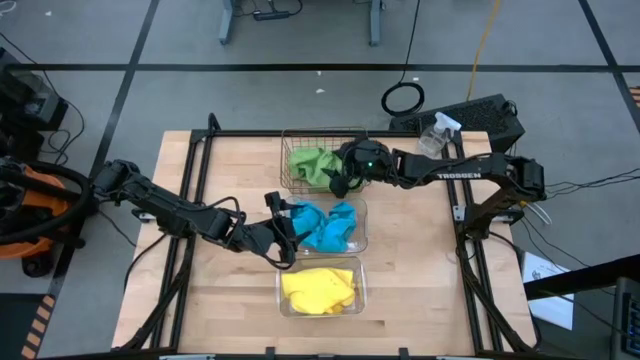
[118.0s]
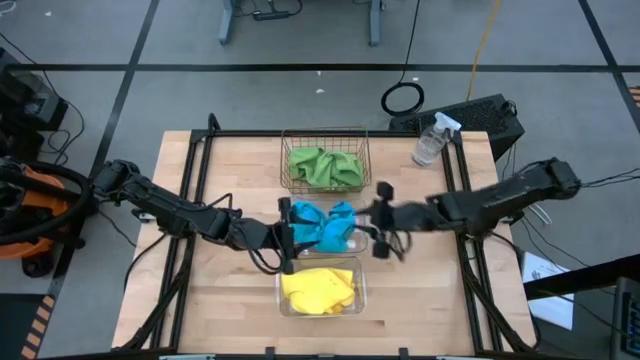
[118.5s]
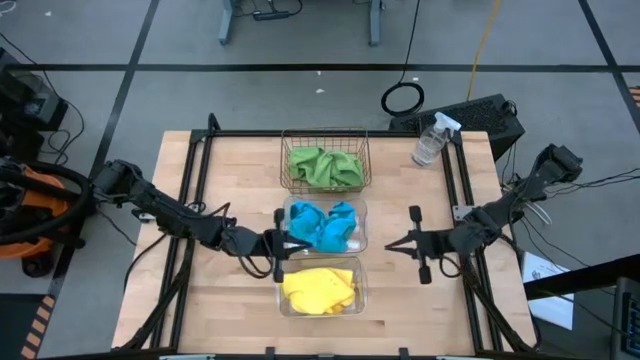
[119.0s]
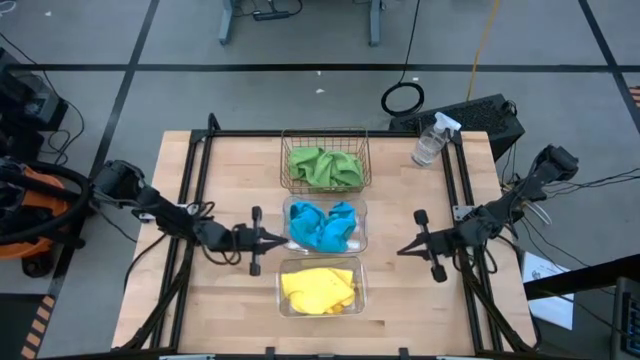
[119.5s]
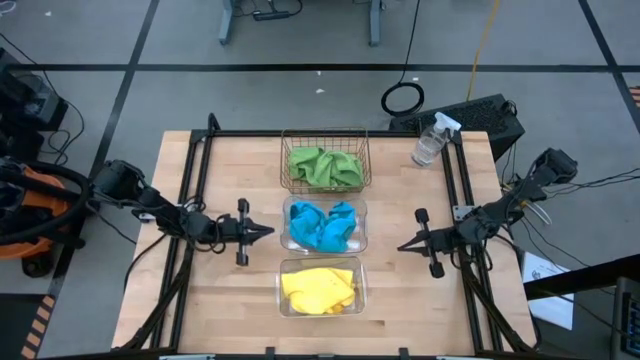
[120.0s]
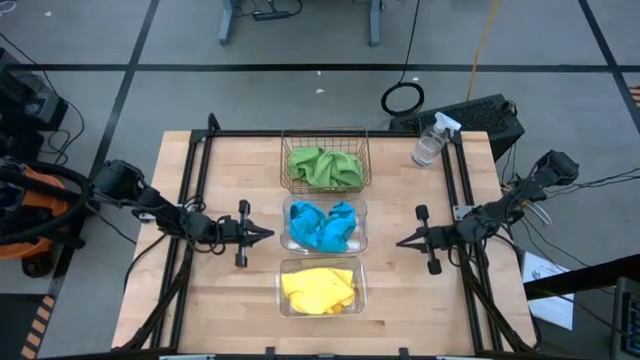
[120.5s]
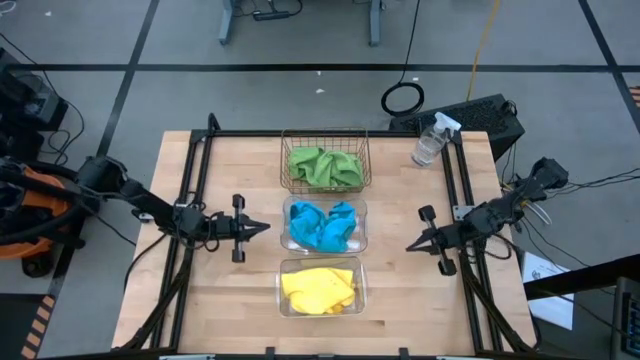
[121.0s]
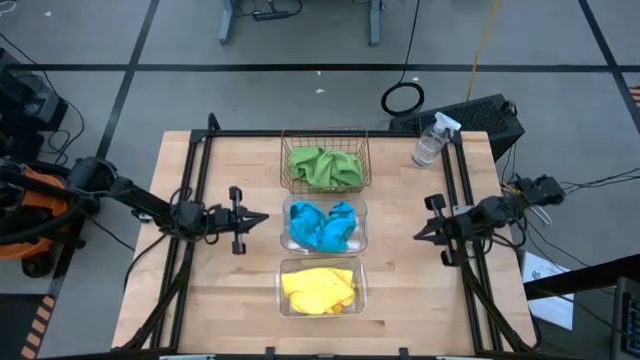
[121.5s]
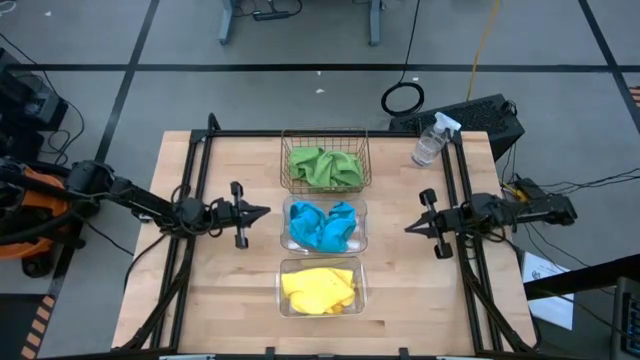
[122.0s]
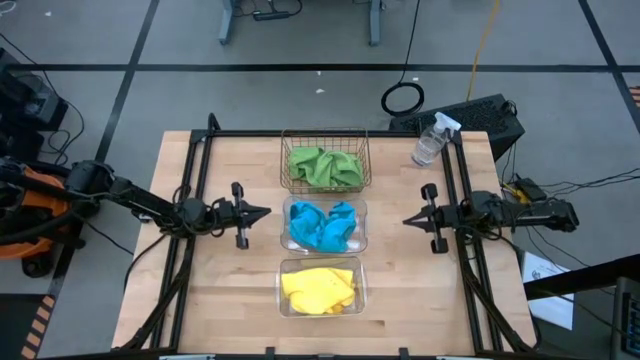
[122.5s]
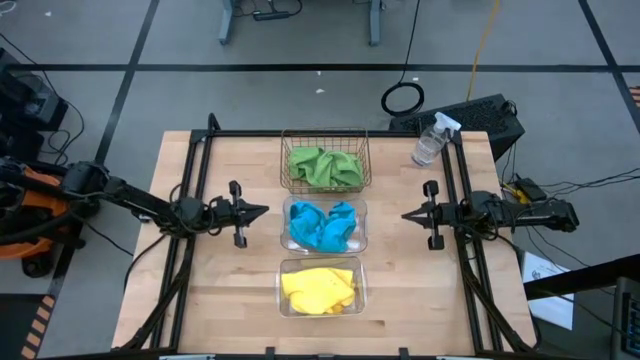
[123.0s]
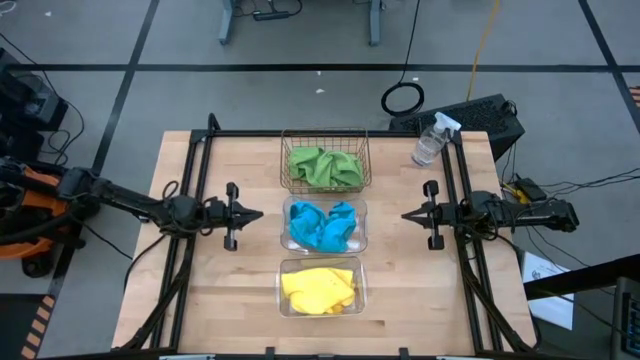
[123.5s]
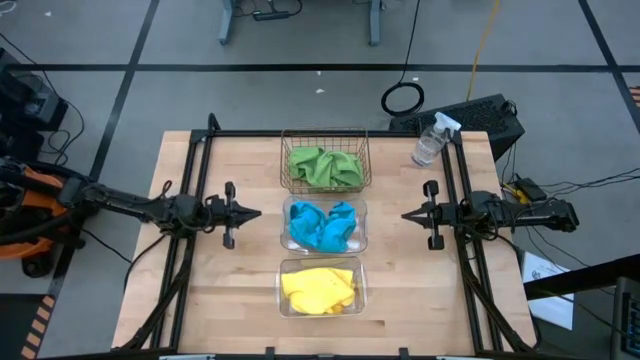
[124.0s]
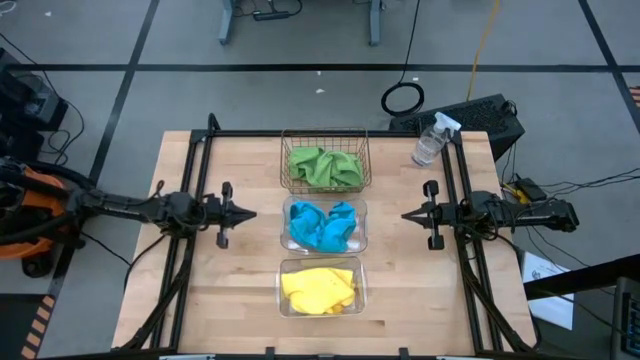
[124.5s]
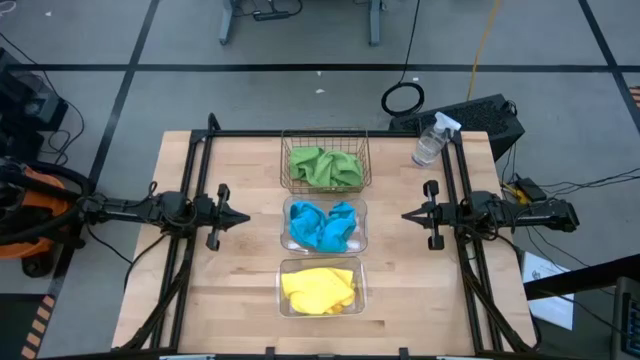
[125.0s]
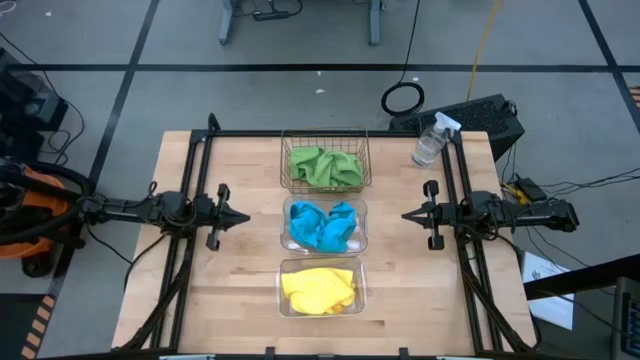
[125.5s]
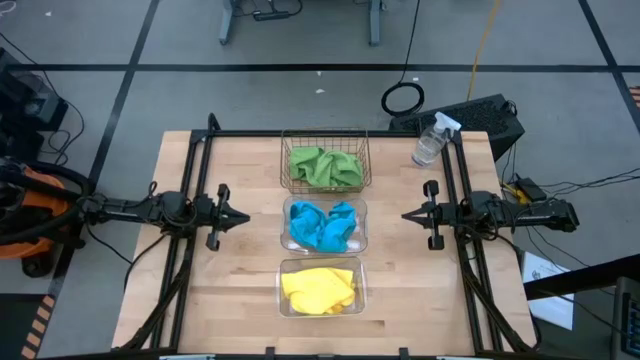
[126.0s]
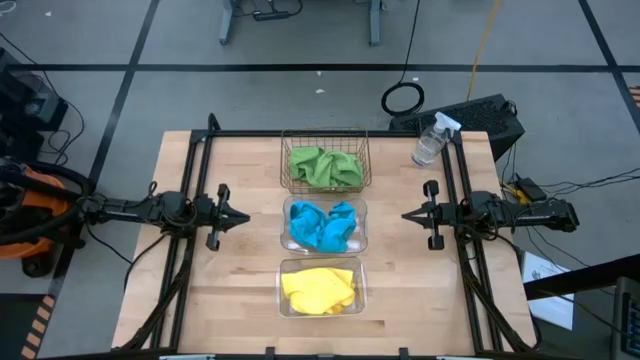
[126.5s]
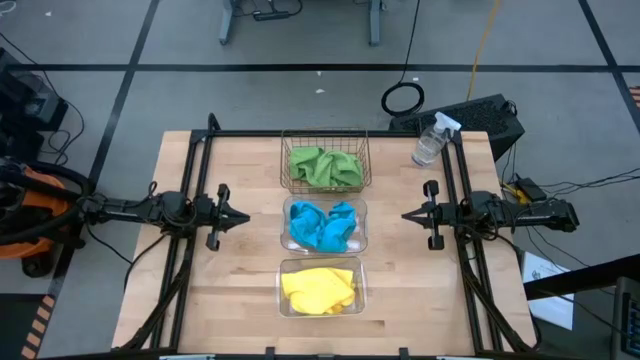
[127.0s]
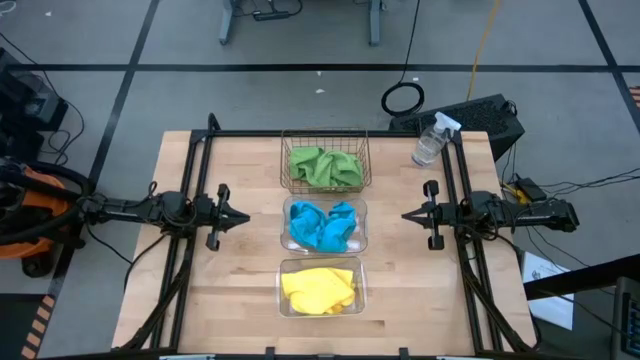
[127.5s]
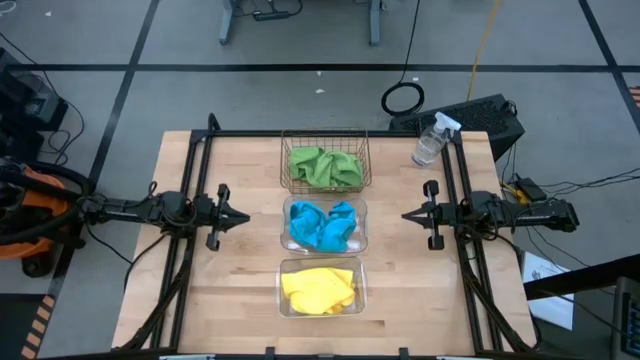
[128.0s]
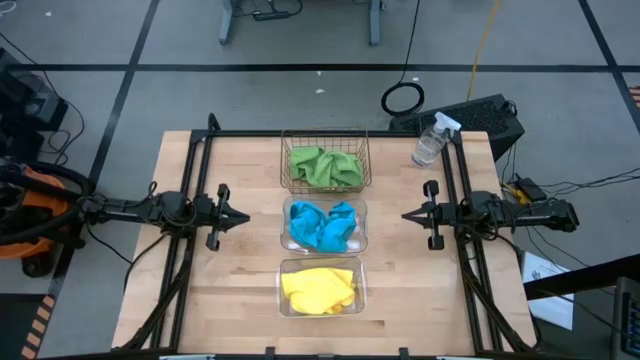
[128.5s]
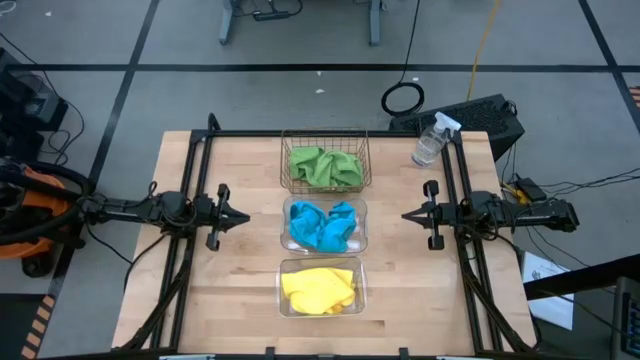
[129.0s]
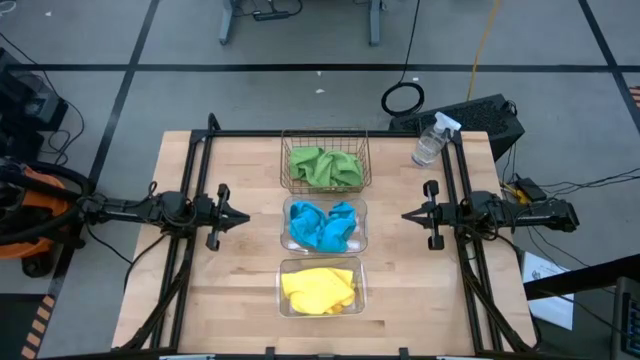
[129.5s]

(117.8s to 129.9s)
Task: Sort microfiber towel by color & place in baskets
Return to Home Position

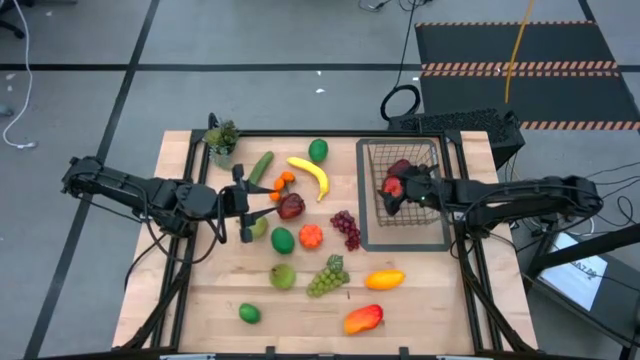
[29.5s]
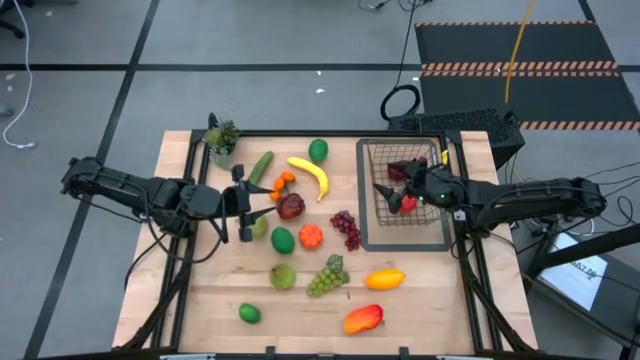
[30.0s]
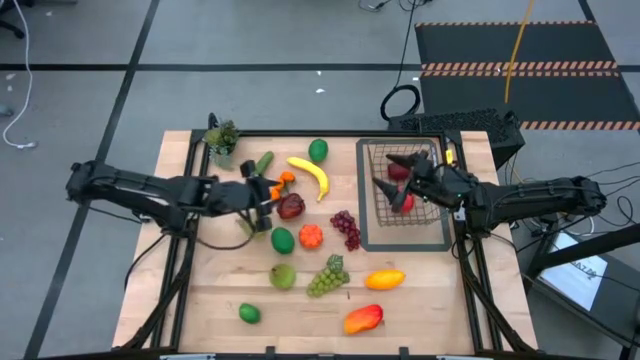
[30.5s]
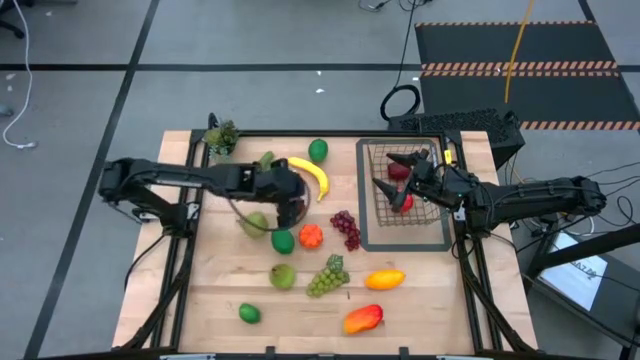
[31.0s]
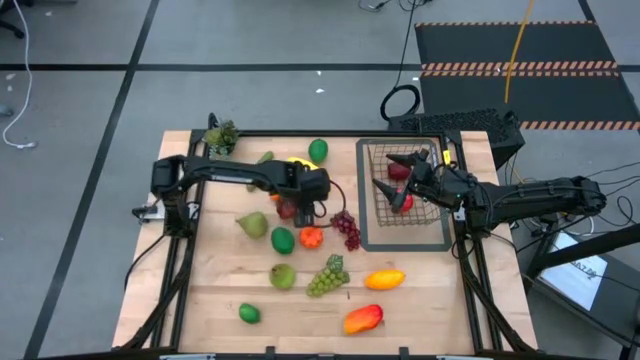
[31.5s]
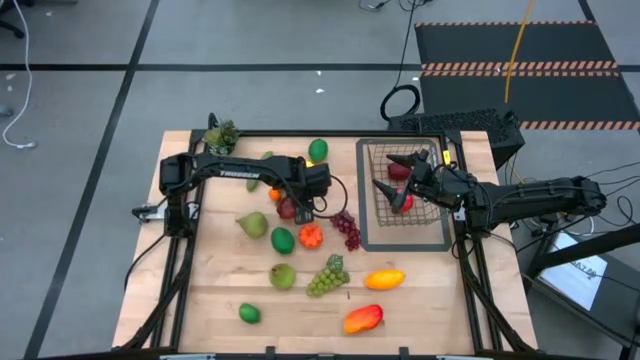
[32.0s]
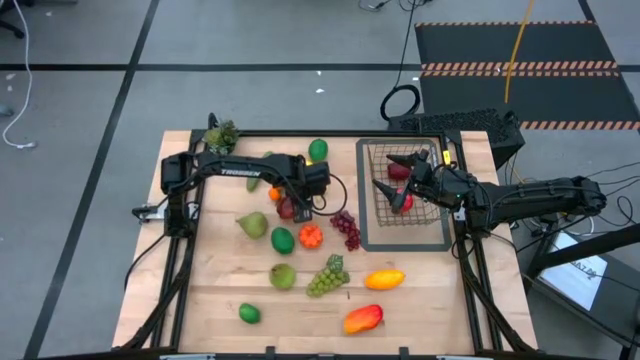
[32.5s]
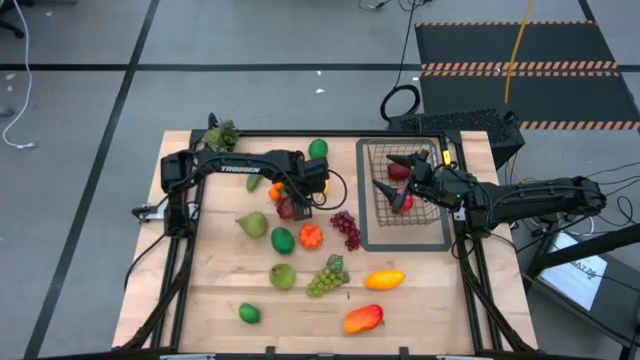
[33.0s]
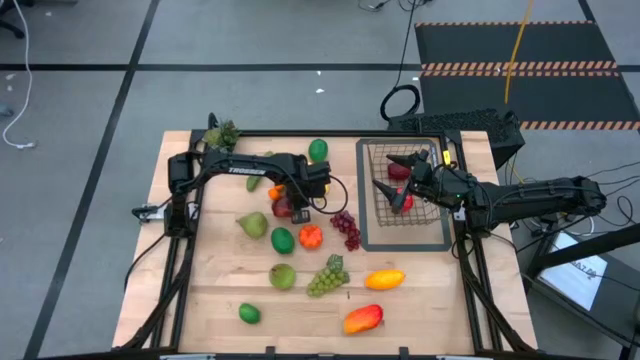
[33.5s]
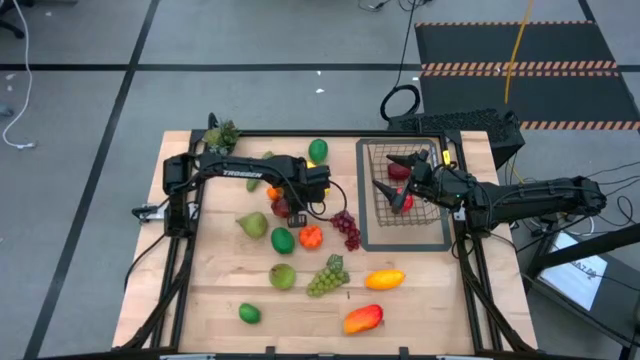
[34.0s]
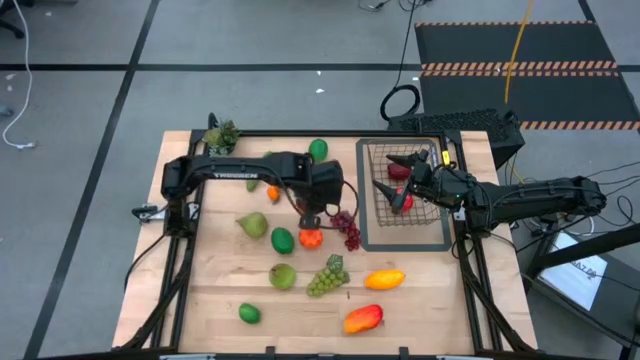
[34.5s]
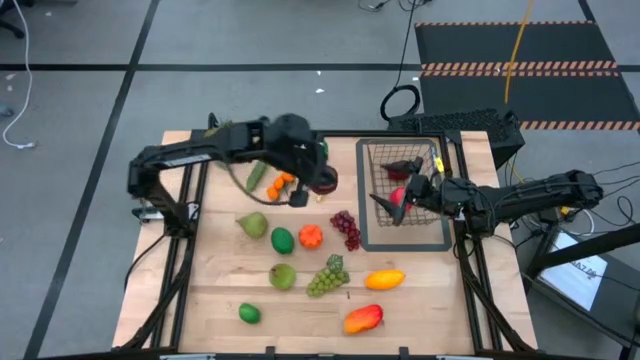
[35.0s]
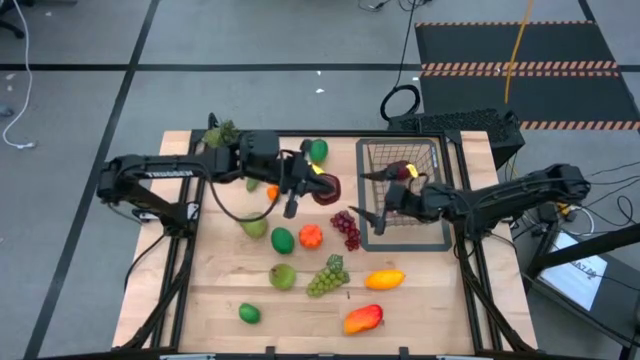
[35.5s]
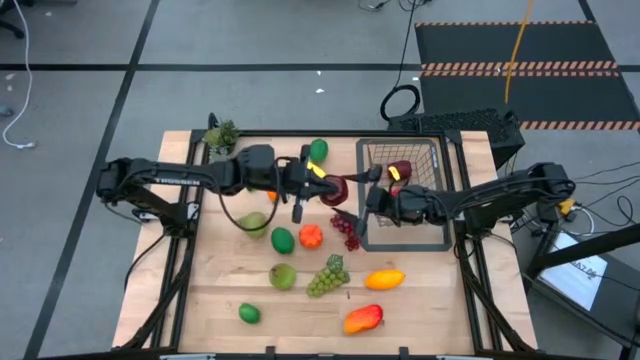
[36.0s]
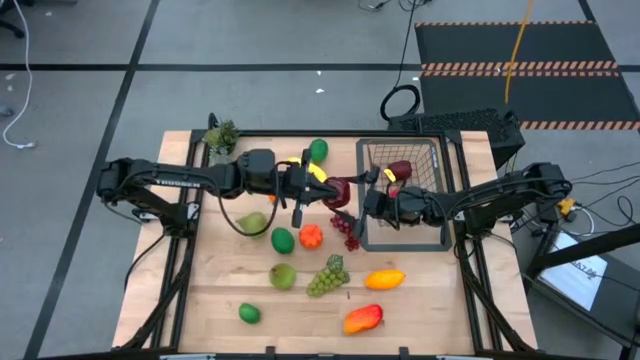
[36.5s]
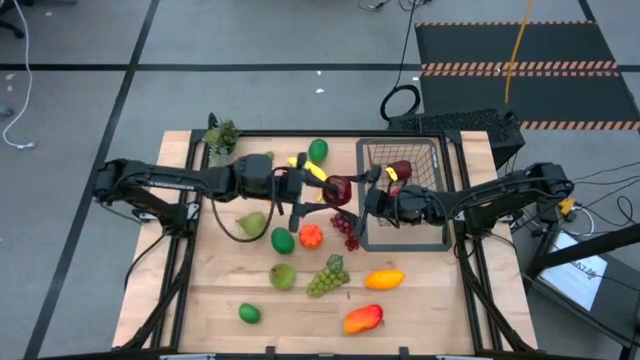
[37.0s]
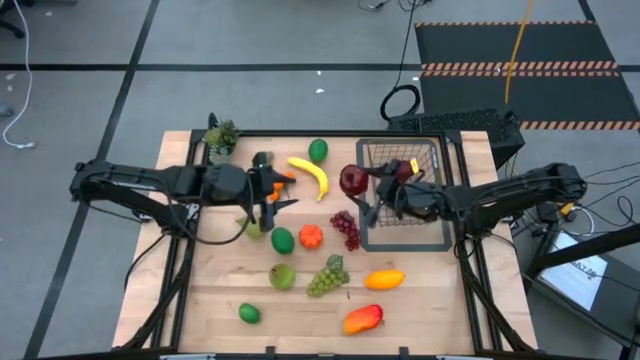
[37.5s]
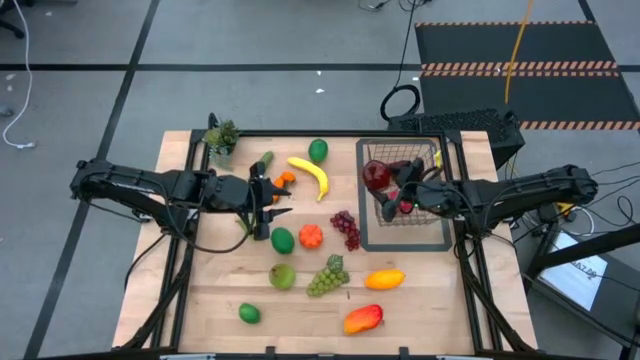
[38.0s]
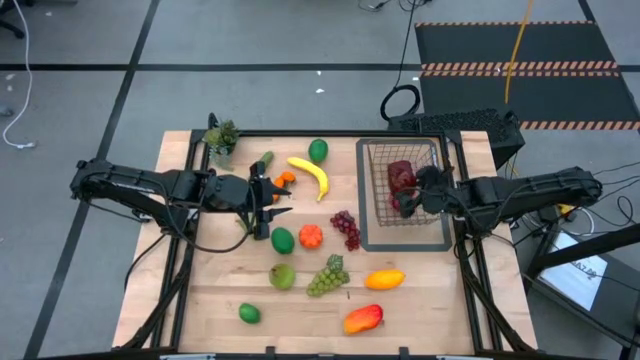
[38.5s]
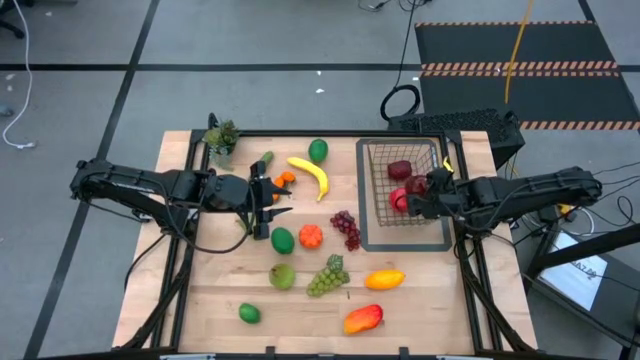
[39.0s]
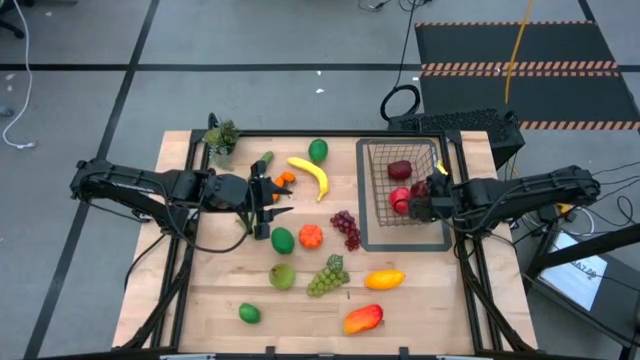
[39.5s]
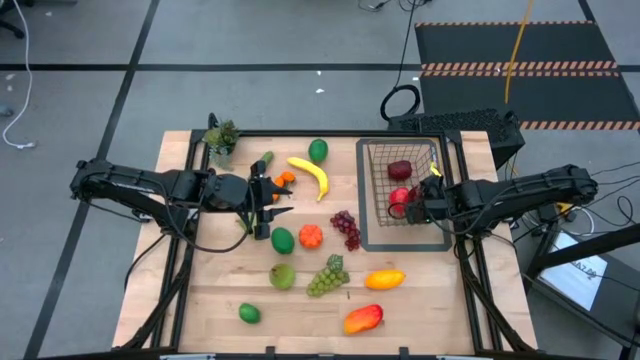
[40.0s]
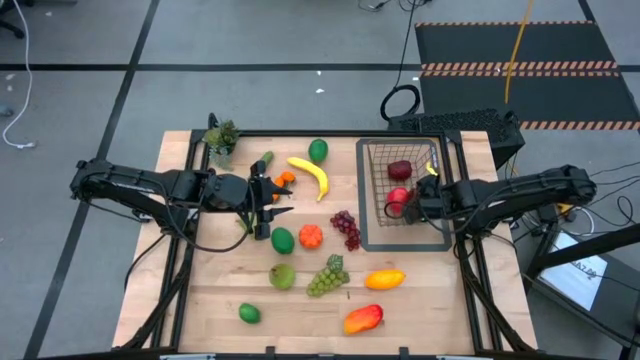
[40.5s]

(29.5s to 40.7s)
Task: Build produce basket
Put the apple into the gold wire basket
